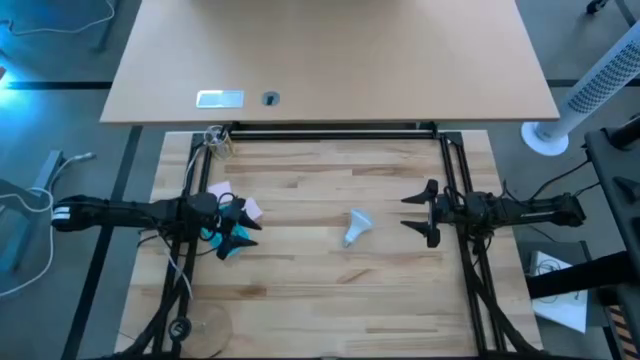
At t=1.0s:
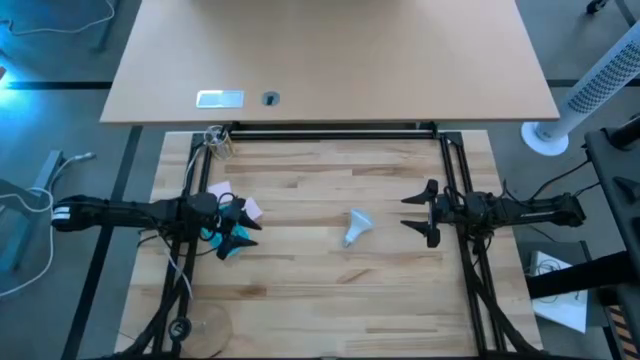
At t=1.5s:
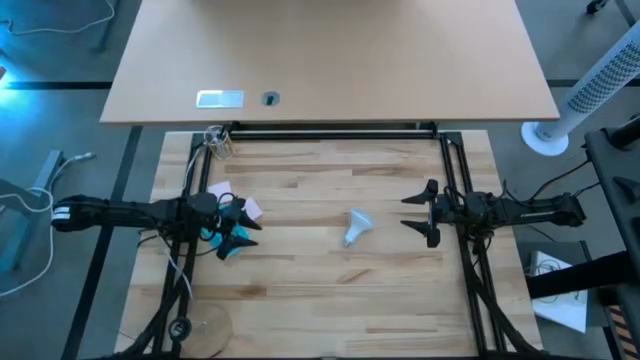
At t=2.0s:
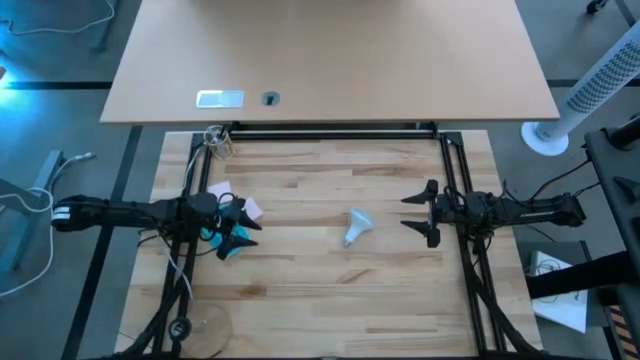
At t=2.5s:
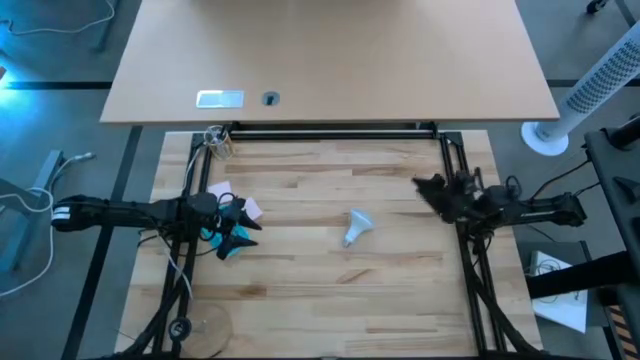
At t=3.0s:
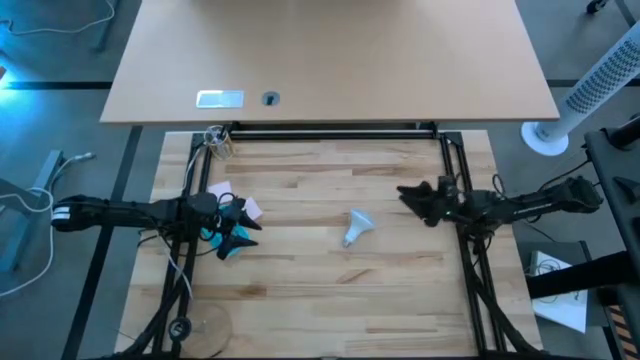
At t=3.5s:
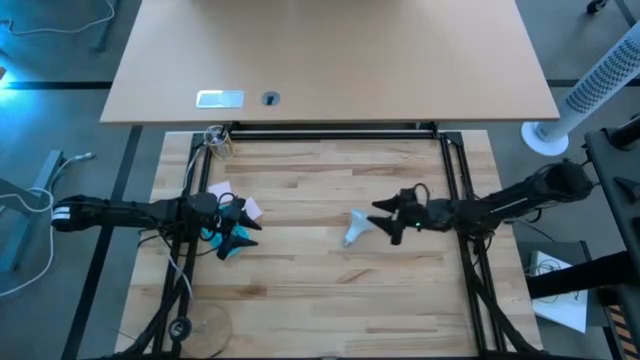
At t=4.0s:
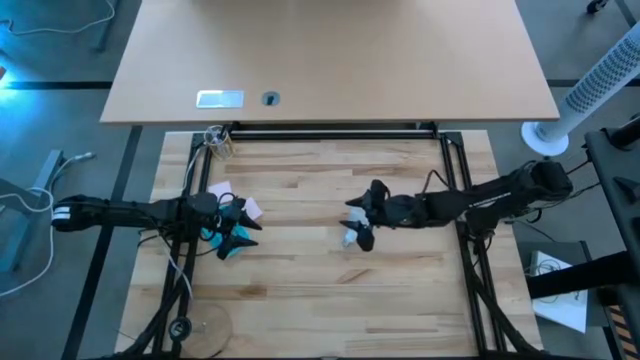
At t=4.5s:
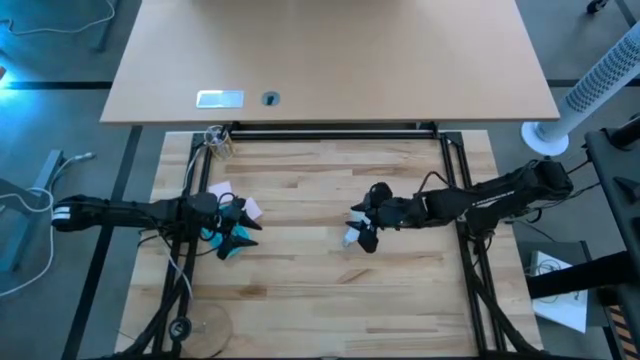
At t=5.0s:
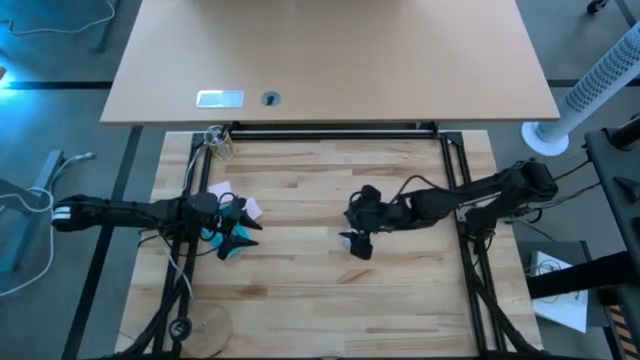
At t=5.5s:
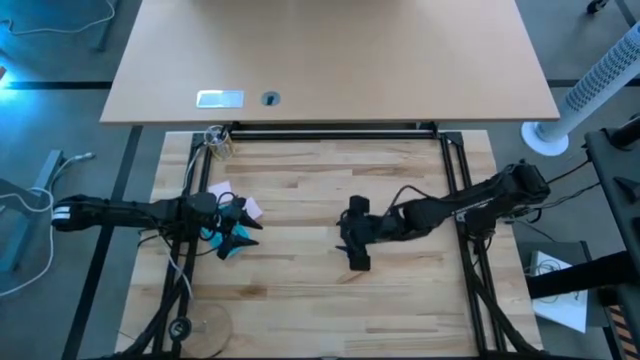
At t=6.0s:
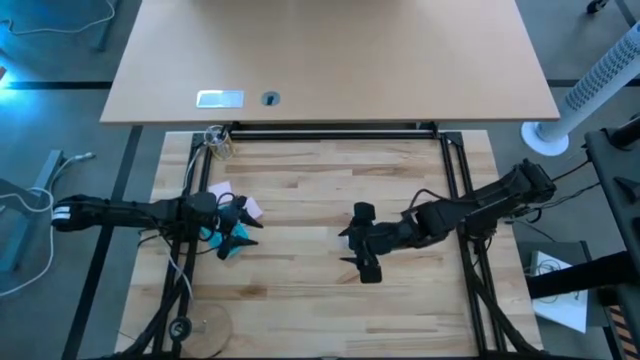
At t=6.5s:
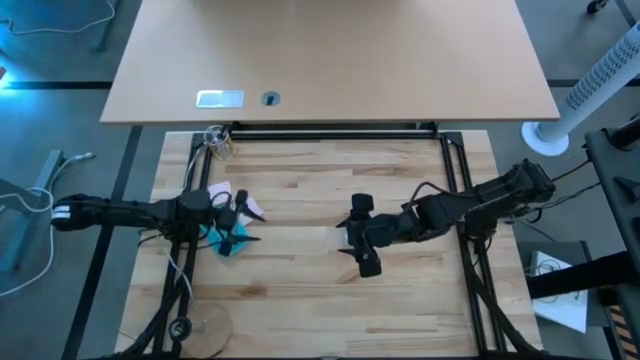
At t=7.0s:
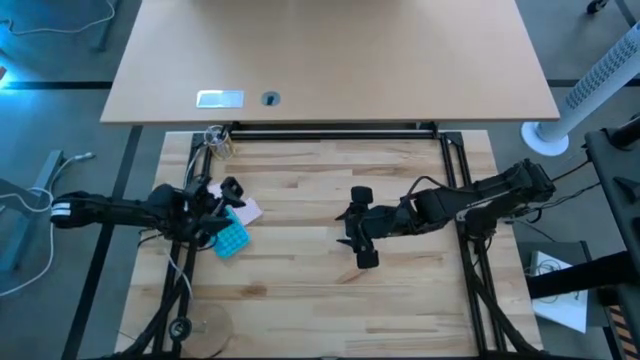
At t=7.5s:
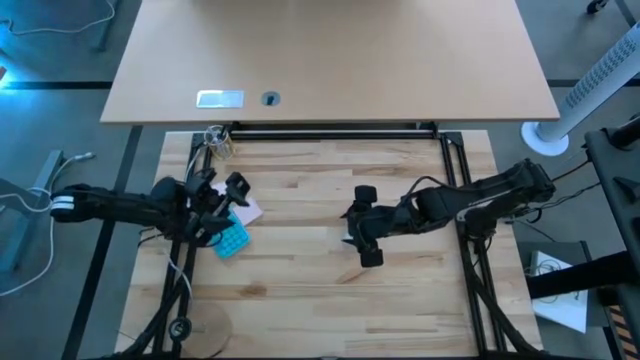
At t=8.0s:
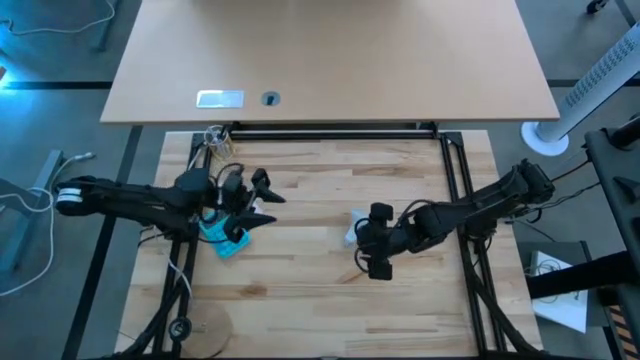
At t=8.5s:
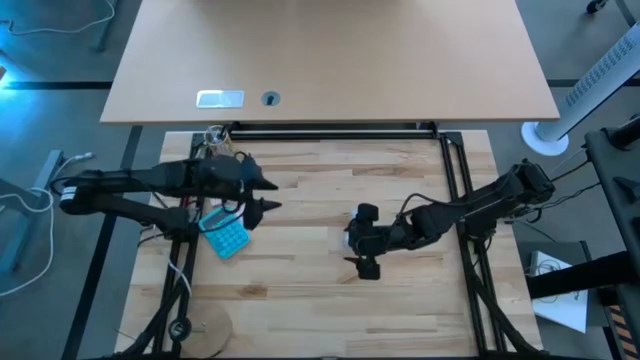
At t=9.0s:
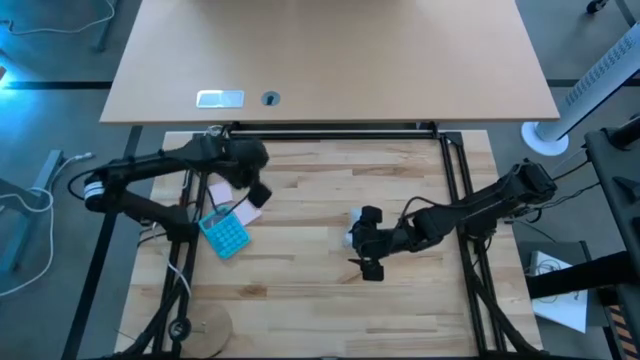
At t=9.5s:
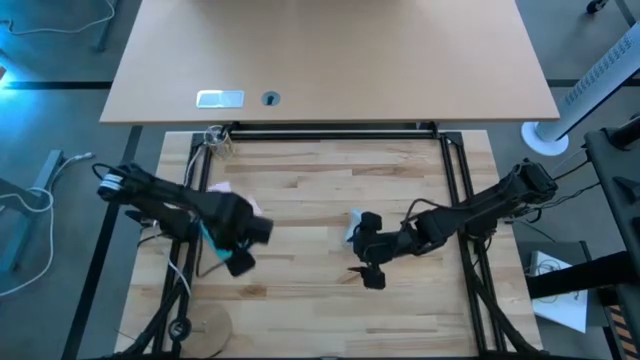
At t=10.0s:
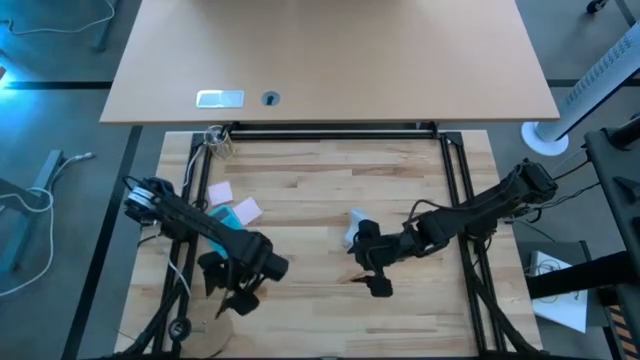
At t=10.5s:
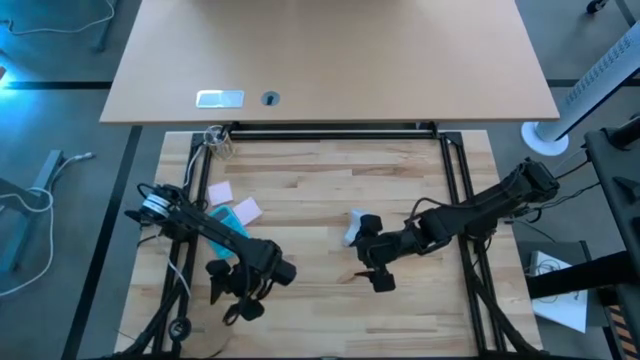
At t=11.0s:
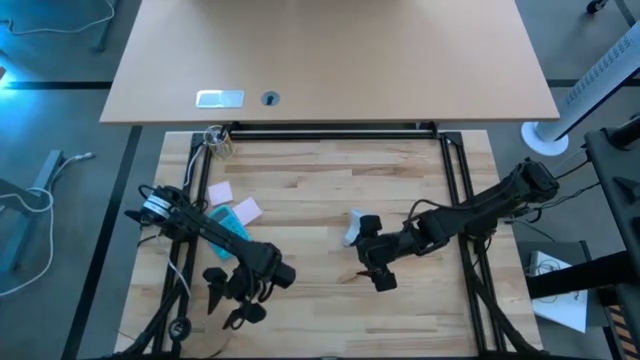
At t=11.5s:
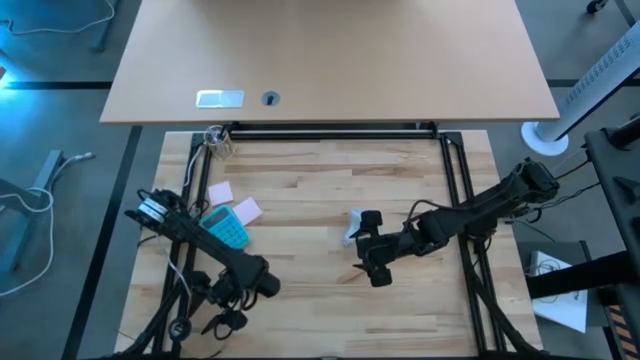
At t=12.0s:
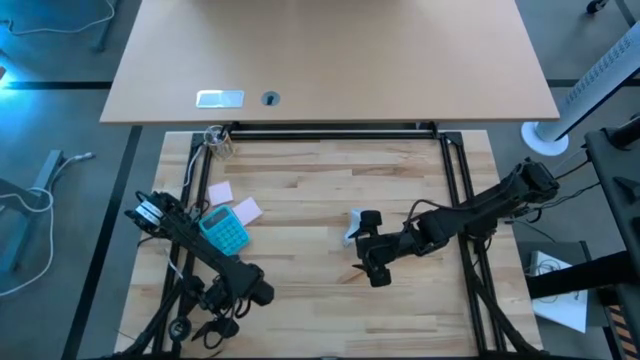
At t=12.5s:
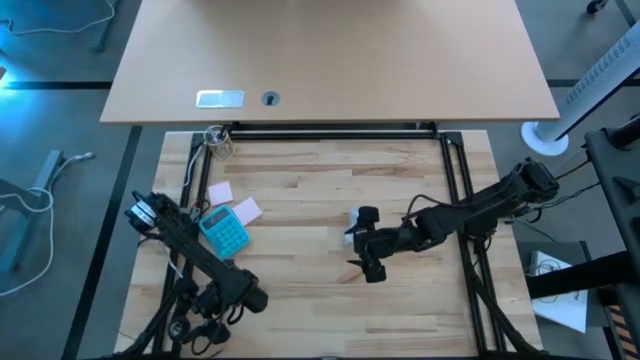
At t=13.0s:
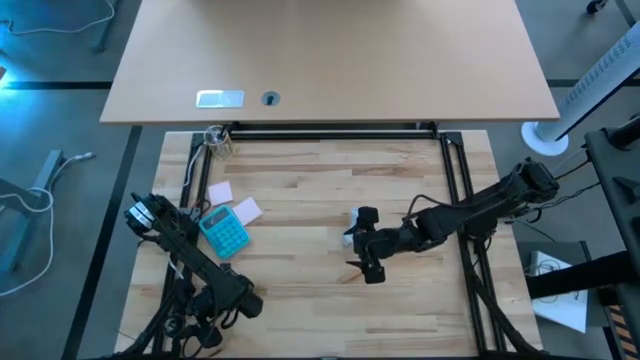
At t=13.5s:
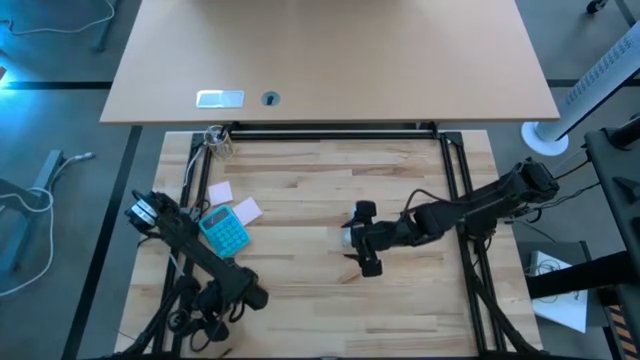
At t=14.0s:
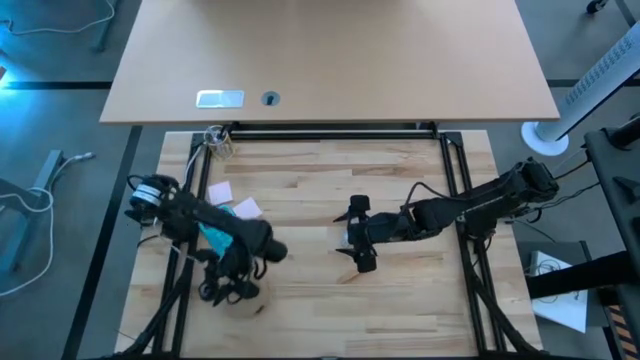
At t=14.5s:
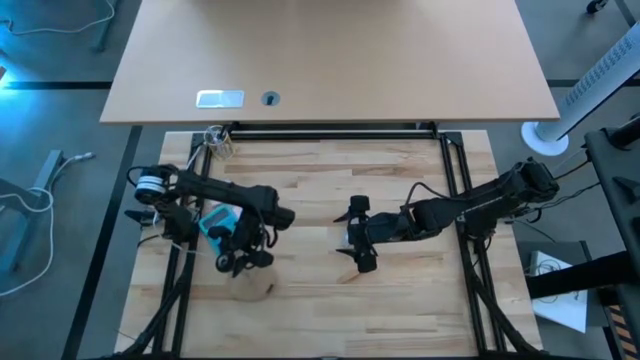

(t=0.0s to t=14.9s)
Task: Screw lightbulb
Insert the lightbulb into the lamp

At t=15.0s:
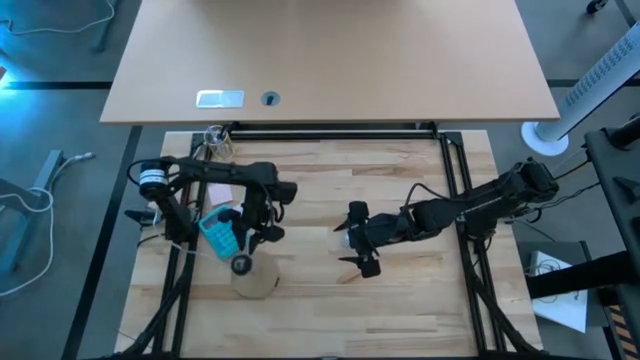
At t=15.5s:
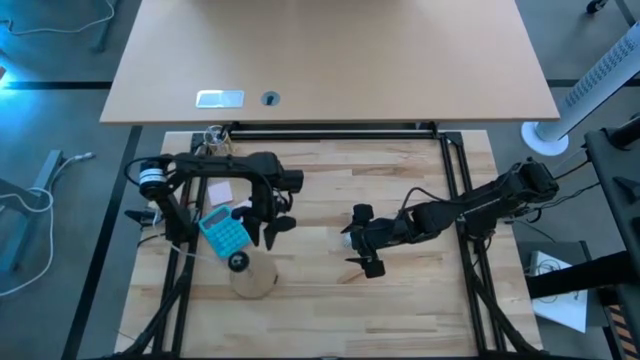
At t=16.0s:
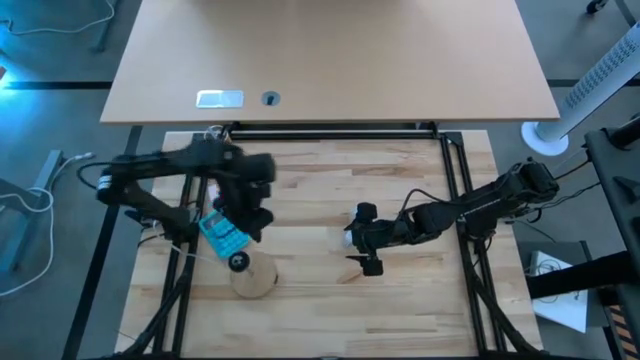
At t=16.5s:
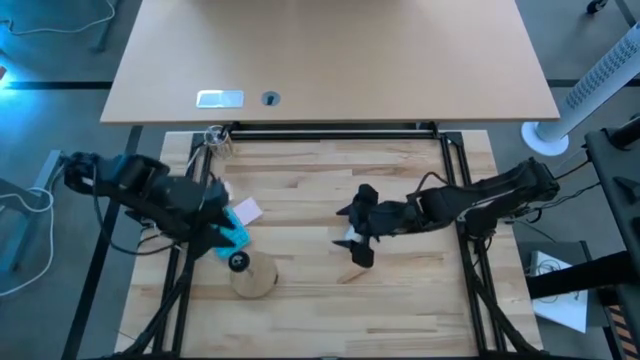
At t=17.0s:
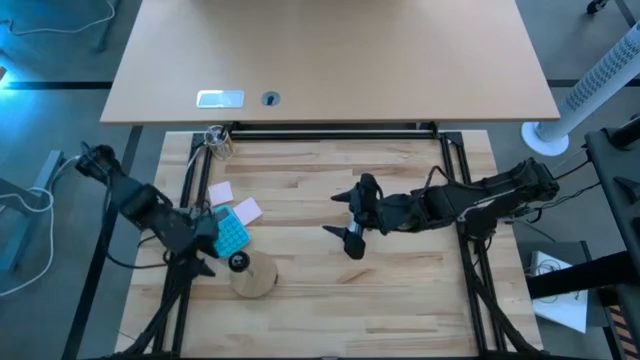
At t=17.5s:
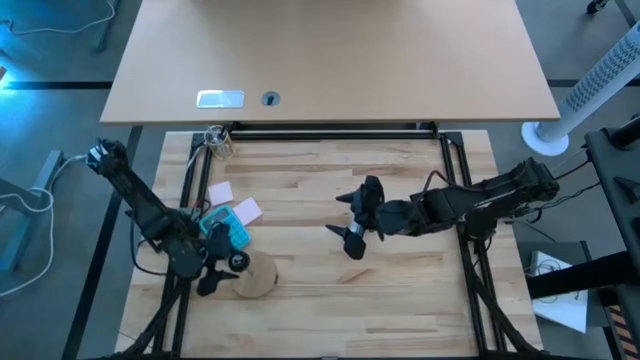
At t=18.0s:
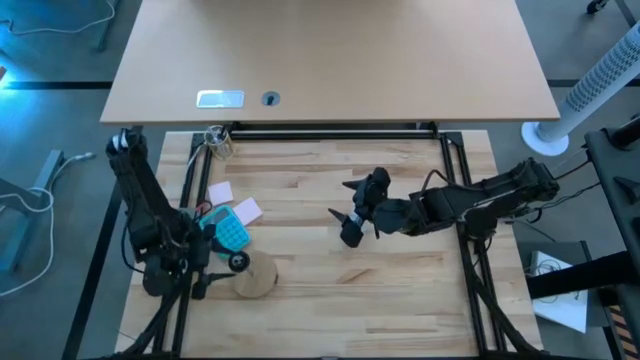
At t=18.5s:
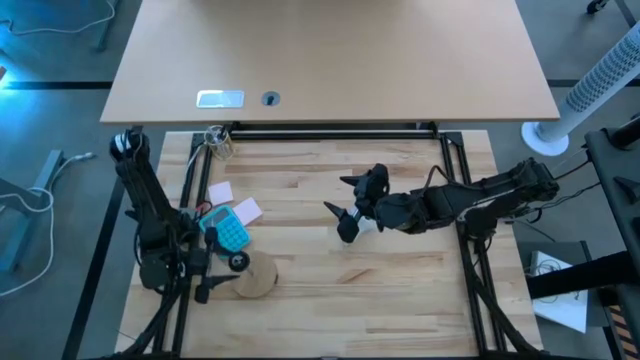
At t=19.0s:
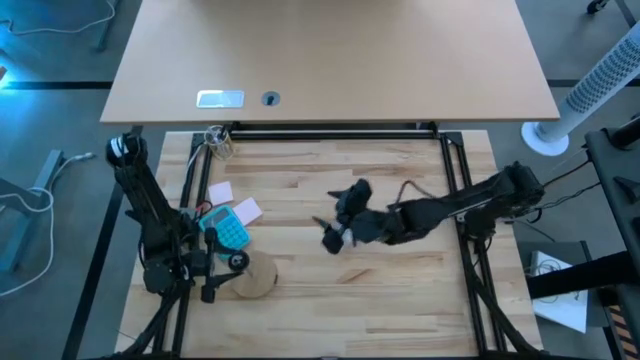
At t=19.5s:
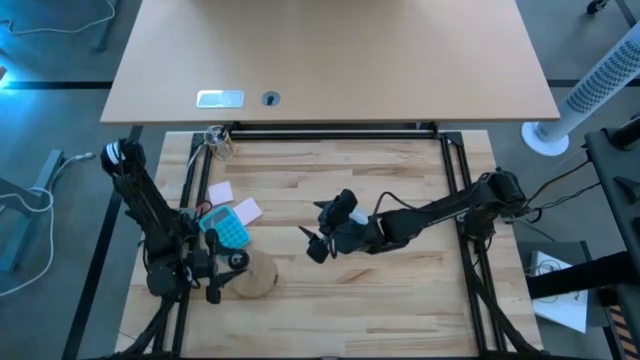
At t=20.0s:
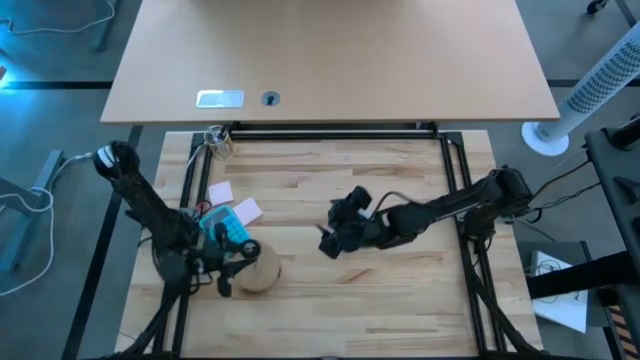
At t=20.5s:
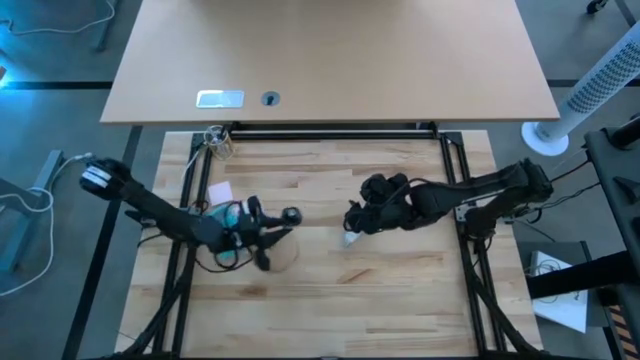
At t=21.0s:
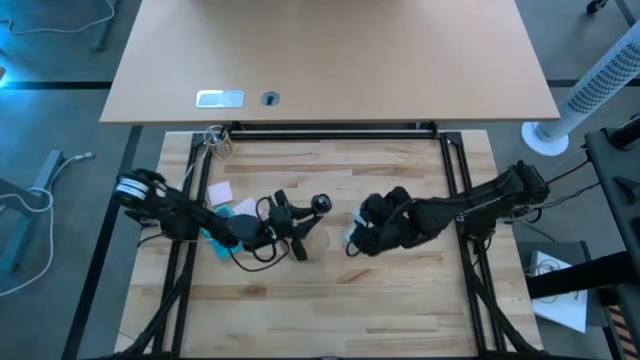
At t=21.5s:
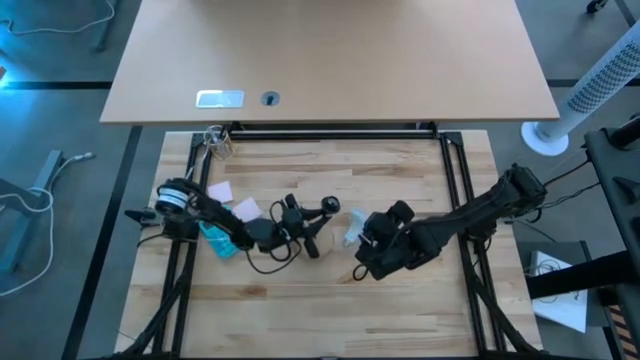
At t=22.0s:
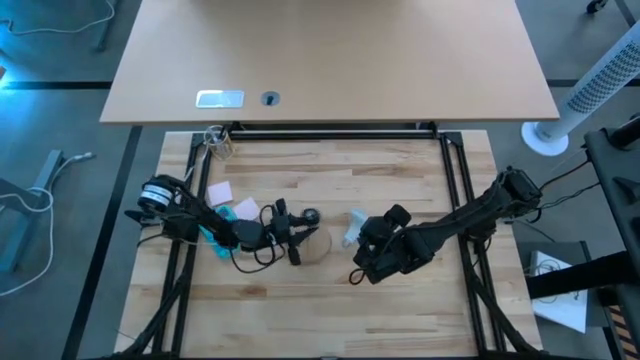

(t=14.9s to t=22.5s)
Insert the lightbulb into the lamp
